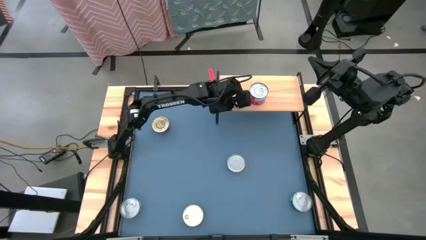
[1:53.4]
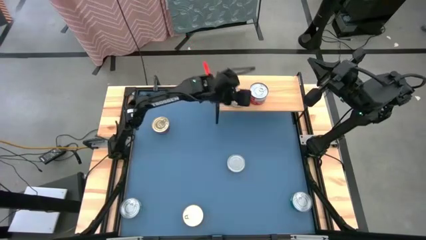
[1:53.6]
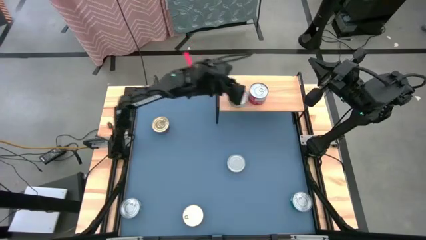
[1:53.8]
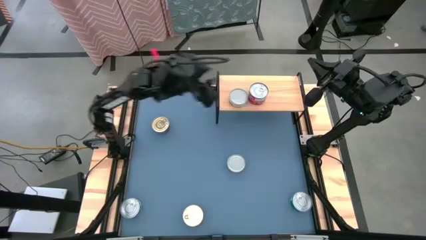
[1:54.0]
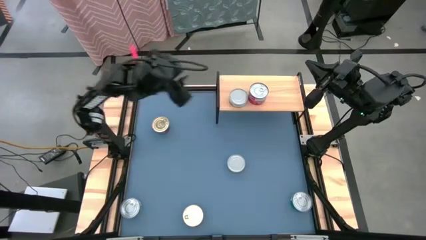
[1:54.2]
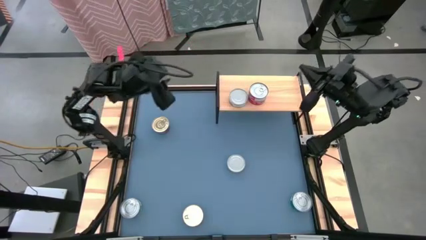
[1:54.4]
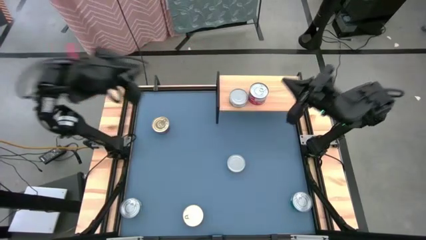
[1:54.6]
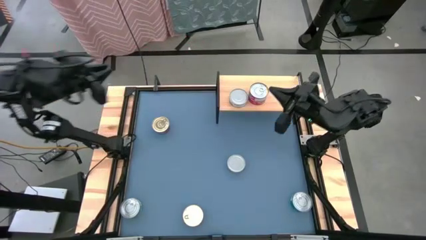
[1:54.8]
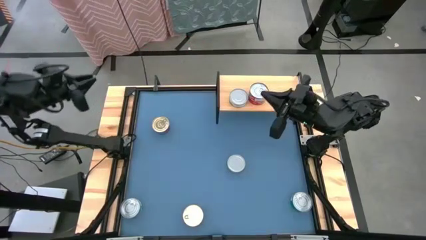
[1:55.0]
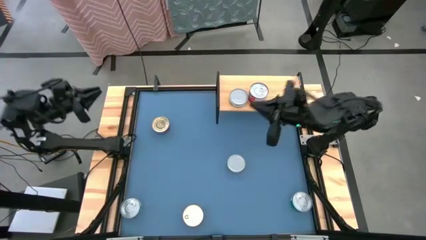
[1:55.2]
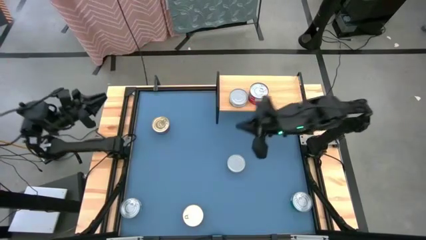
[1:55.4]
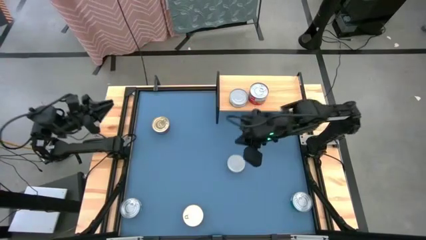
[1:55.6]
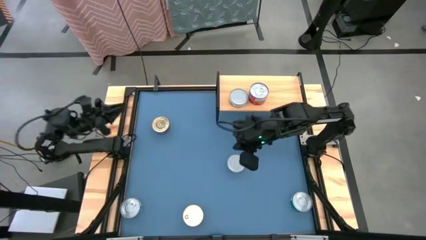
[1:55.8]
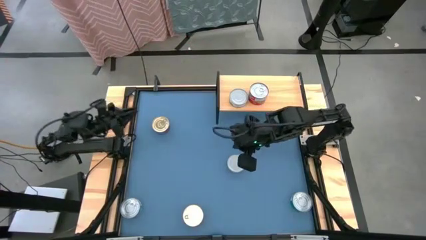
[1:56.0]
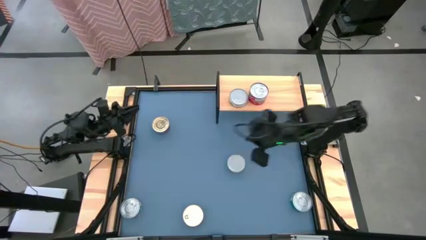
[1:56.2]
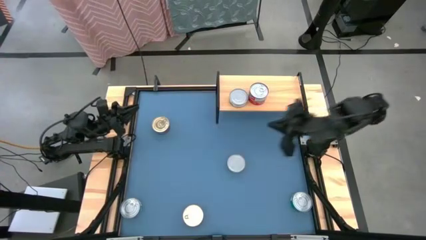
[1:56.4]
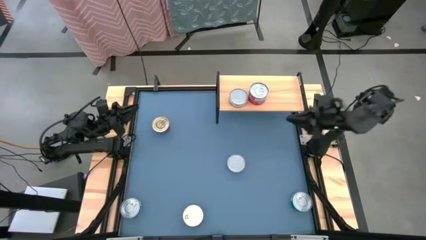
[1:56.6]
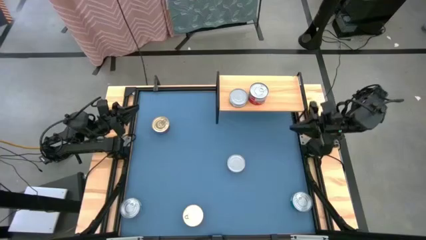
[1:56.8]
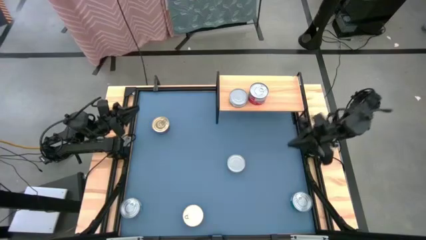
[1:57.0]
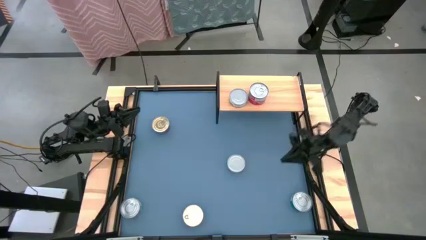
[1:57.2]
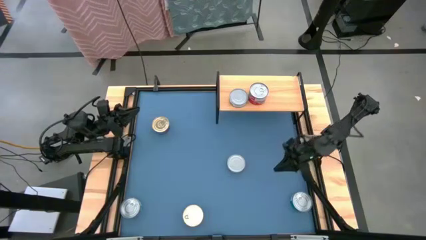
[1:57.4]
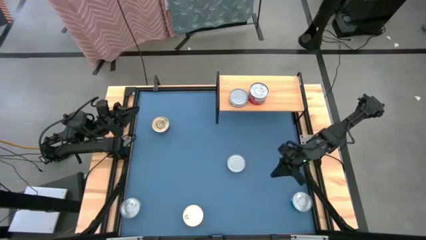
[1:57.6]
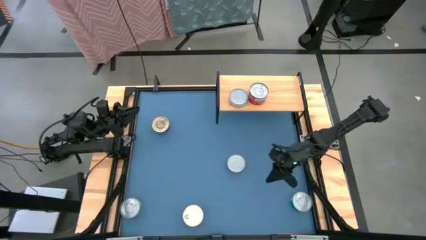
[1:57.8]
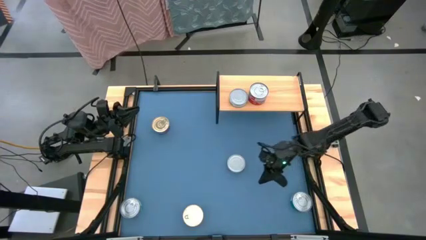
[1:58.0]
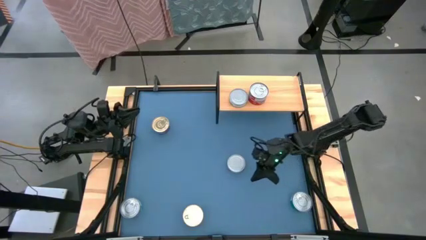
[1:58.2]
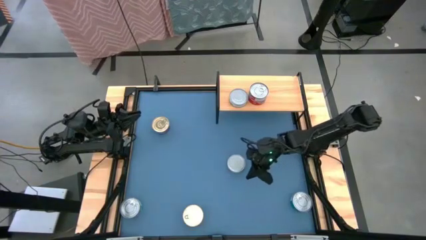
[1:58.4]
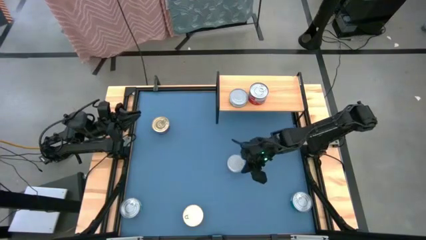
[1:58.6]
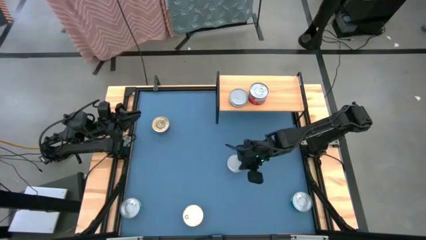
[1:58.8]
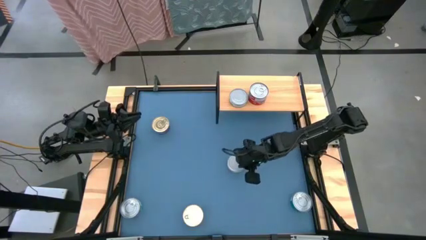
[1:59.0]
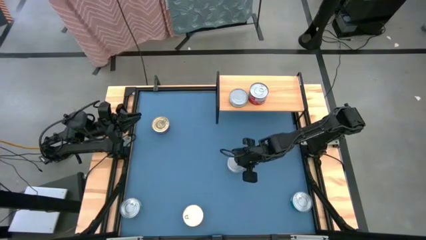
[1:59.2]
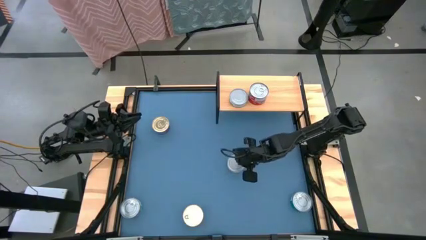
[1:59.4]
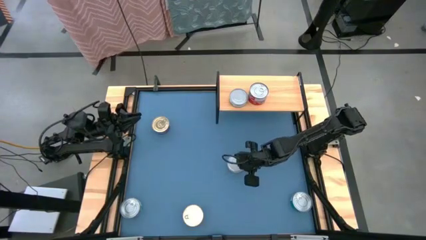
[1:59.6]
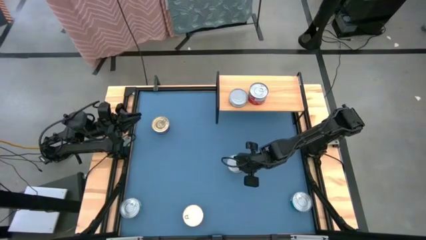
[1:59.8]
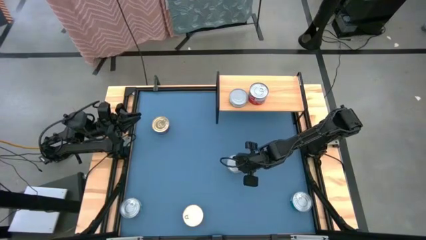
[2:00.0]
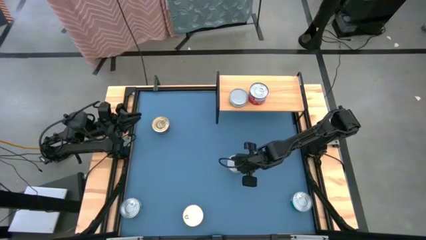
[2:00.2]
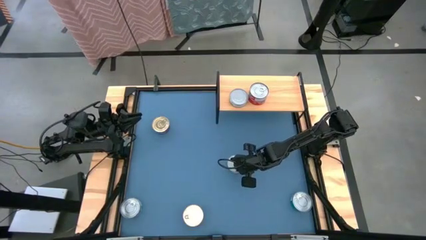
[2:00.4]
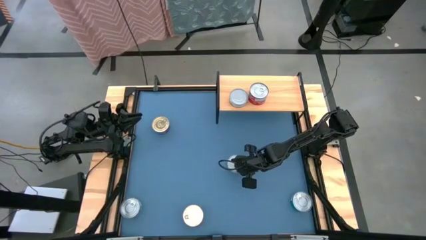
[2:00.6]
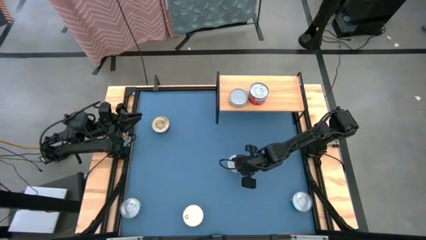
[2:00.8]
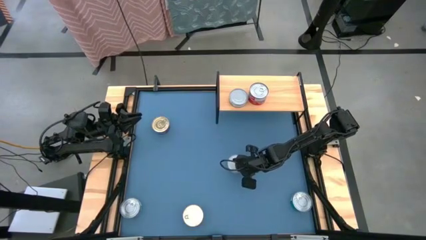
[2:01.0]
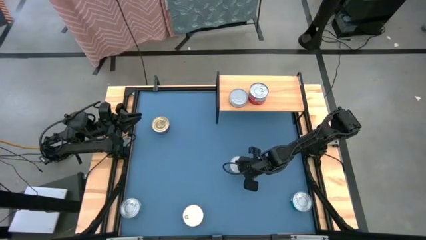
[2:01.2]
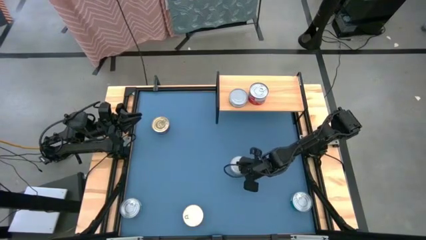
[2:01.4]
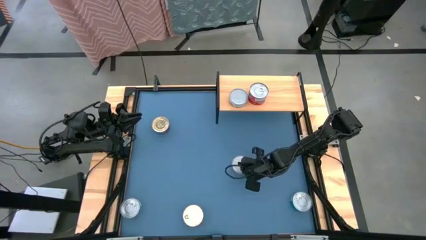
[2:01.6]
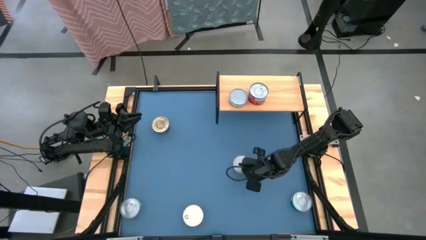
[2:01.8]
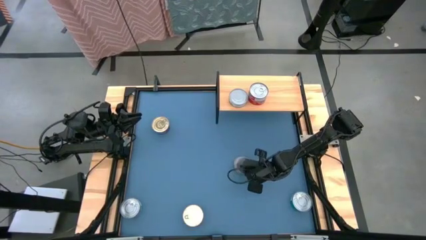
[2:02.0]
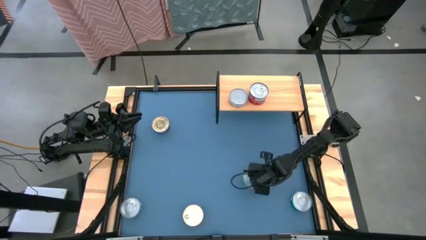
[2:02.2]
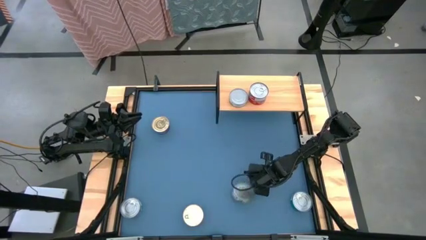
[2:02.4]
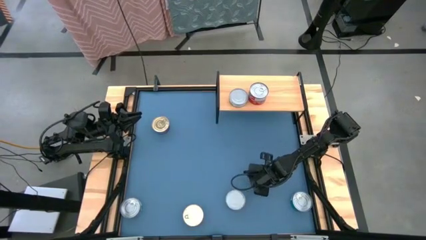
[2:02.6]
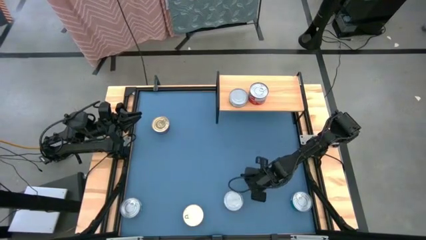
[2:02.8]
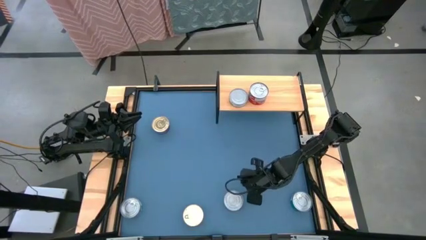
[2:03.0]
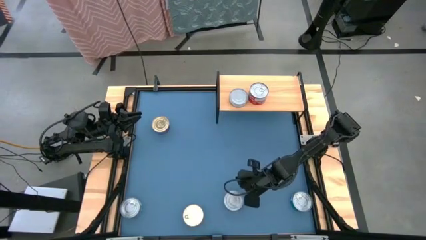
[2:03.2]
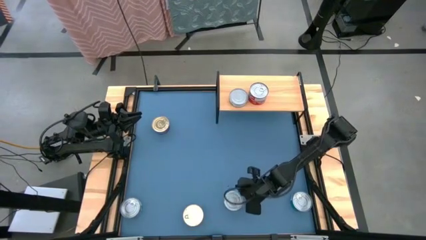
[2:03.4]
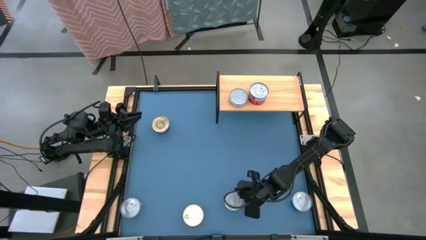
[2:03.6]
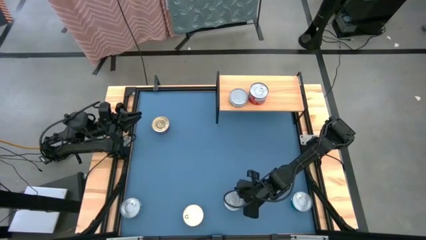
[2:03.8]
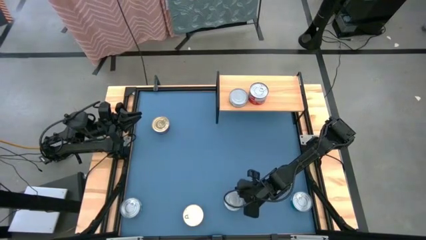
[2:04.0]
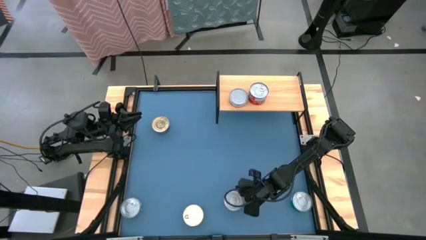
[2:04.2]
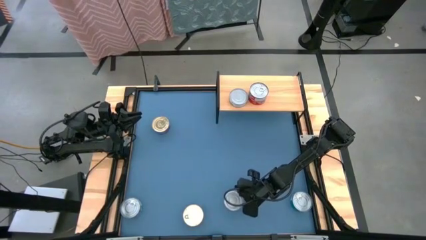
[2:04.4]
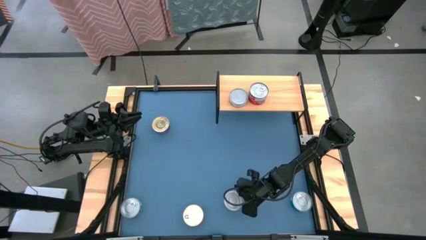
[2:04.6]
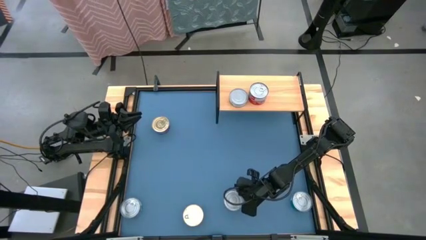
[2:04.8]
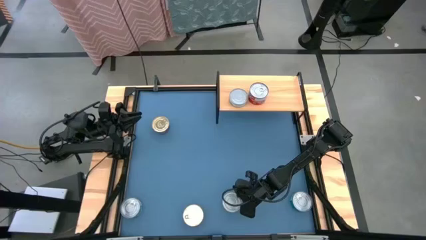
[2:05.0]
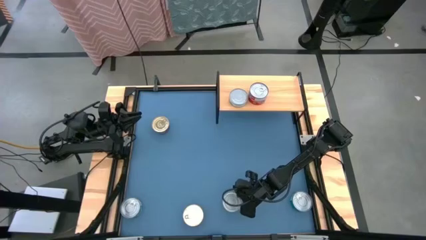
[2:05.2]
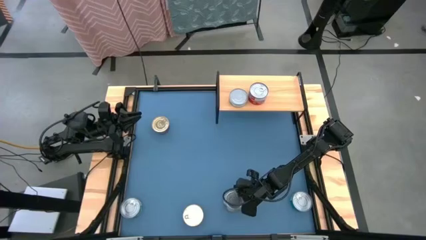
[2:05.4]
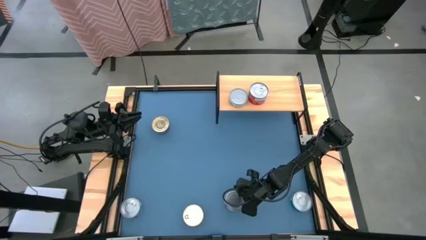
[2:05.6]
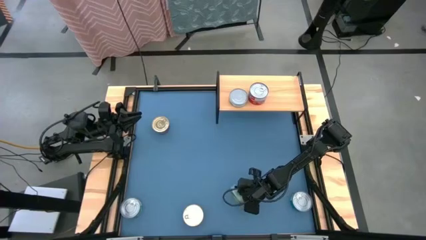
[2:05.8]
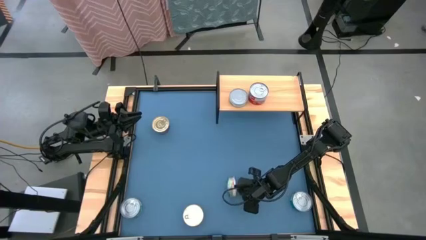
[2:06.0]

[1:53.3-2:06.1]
Task: Stack canned seafood by type on shelf
Stack the green tuna can on top of the white tuna can on the shelf

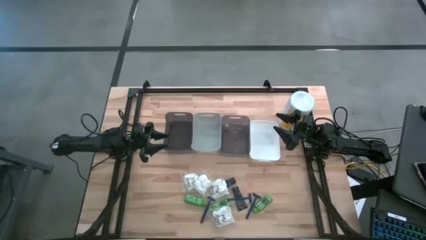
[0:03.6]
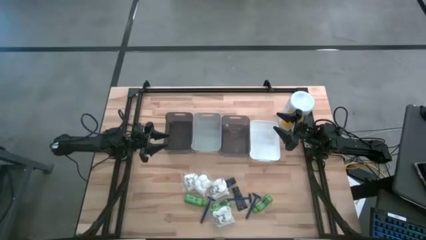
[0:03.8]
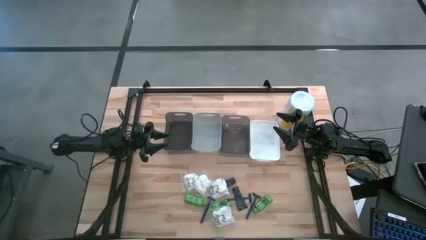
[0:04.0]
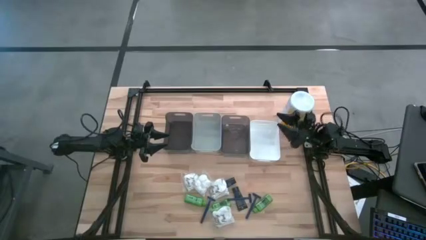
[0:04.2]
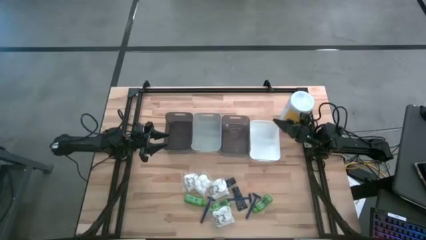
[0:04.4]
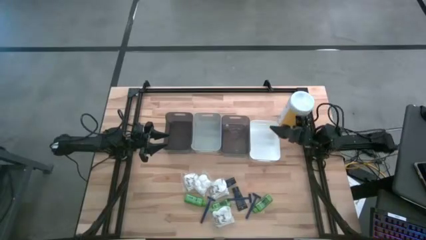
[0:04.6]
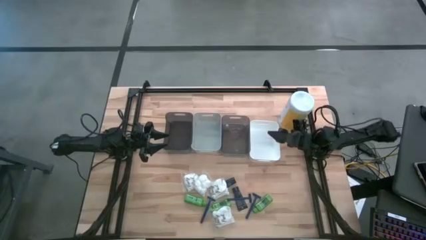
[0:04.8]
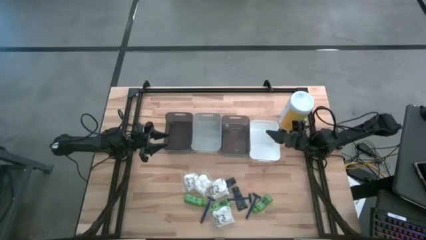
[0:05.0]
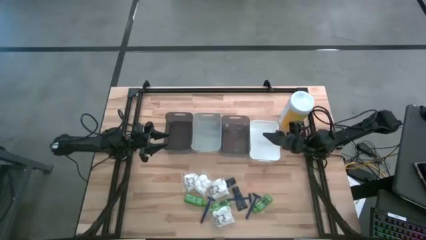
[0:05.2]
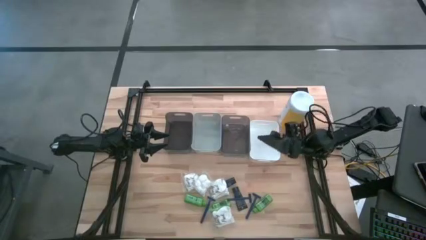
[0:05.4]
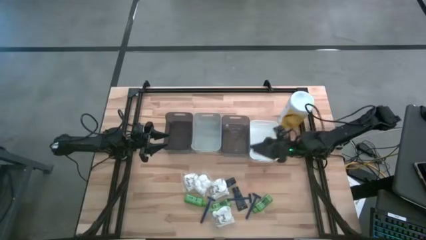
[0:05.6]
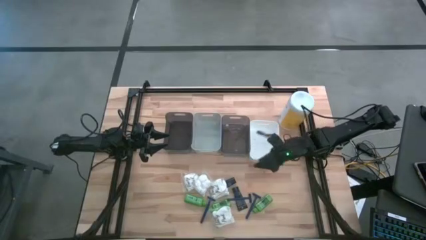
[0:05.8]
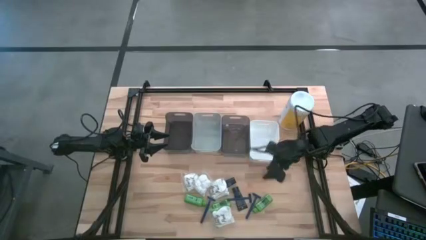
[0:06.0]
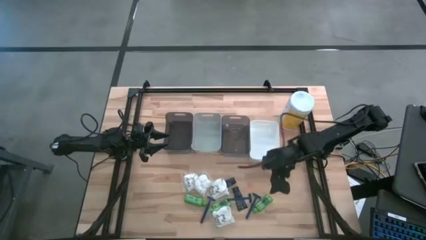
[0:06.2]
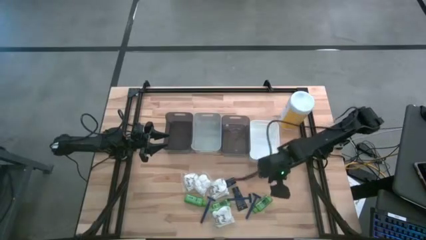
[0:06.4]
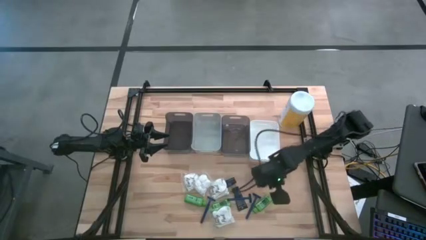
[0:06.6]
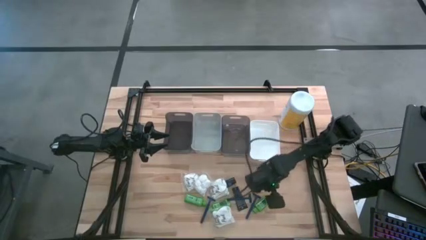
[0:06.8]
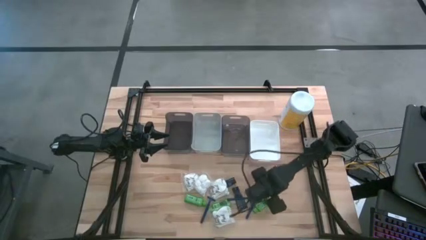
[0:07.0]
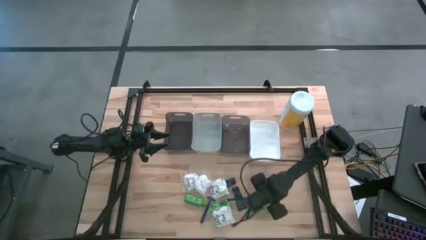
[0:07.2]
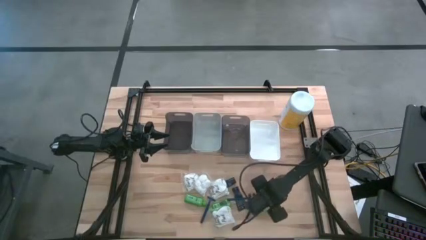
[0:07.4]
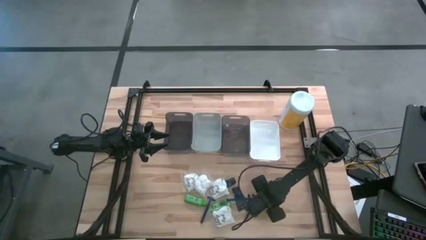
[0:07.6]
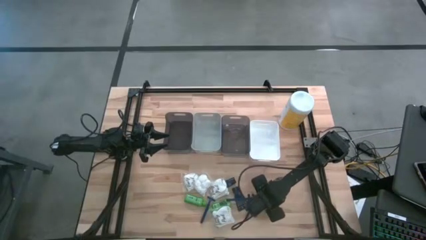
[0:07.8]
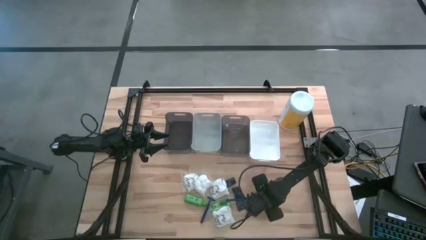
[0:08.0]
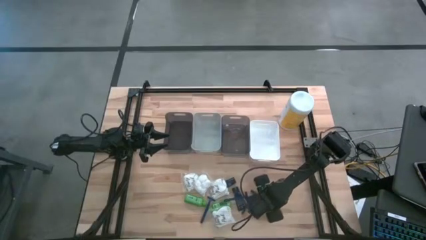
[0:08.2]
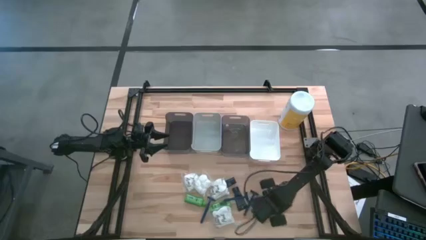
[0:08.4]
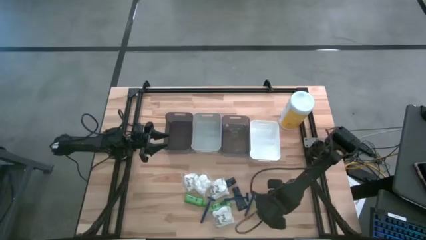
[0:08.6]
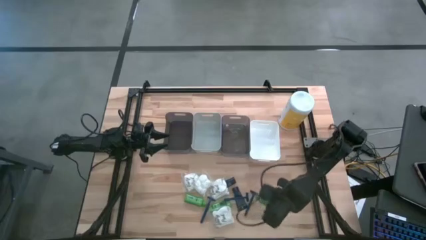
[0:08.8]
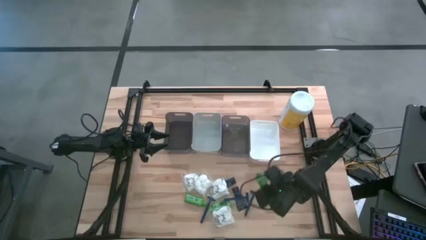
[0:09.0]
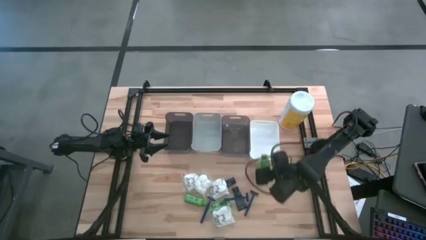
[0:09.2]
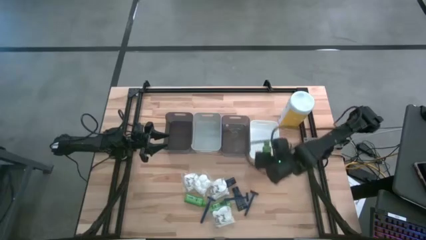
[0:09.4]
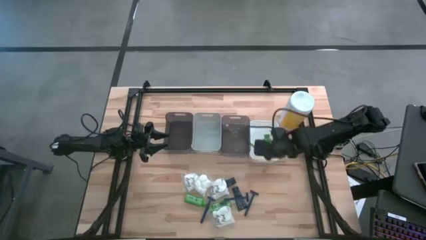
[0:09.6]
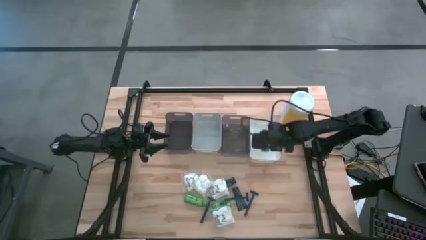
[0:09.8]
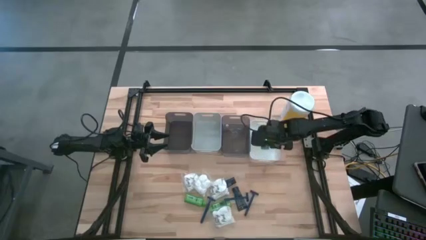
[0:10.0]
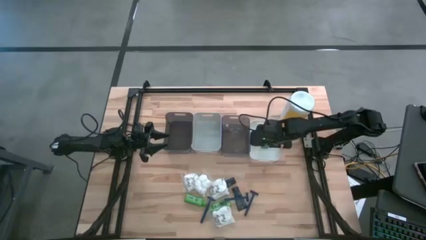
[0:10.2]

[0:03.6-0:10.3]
Task: Pick & Place Travel size toiletries
Put the green shampoo into the white bin
